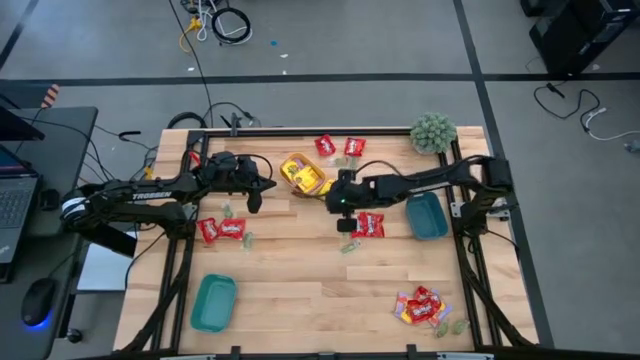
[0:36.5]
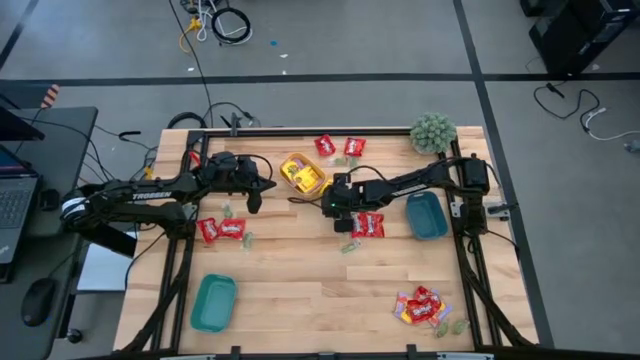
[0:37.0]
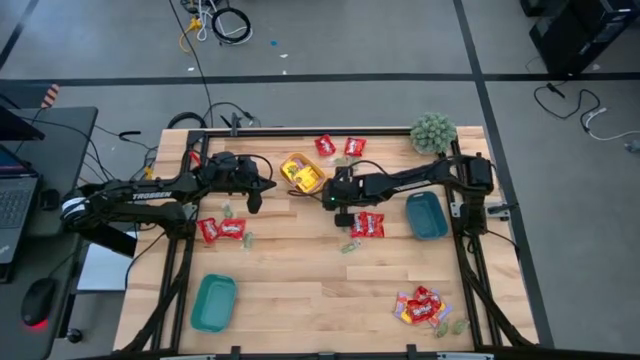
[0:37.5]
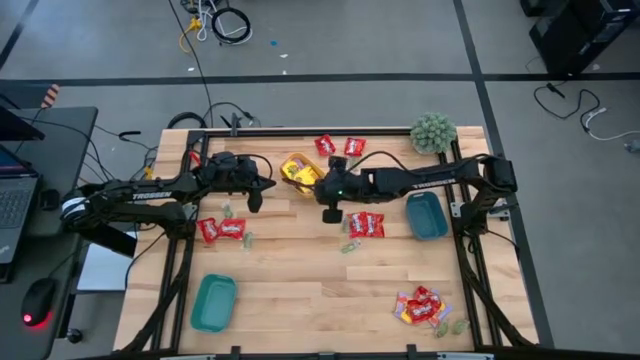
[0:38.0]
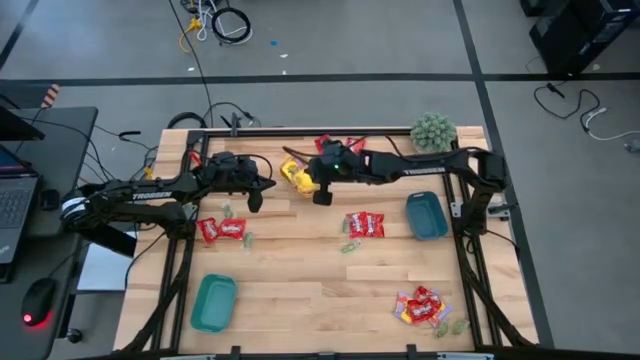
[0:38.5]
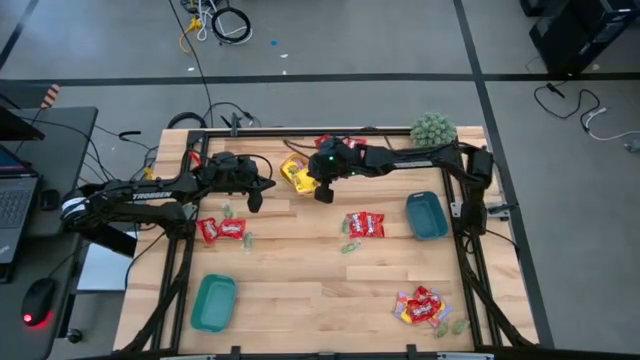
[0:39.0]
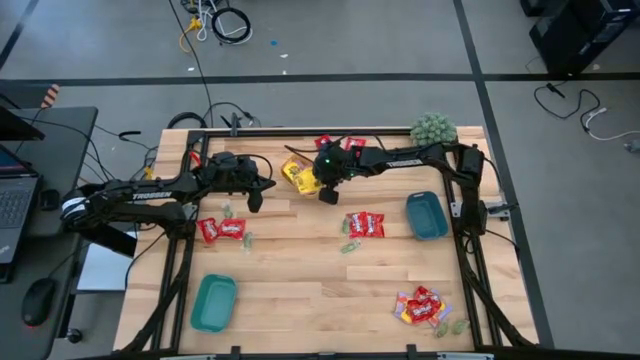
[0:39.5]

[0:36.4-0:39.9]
Task: Sort candy
Put the yellow packet of candy into the yellow bin

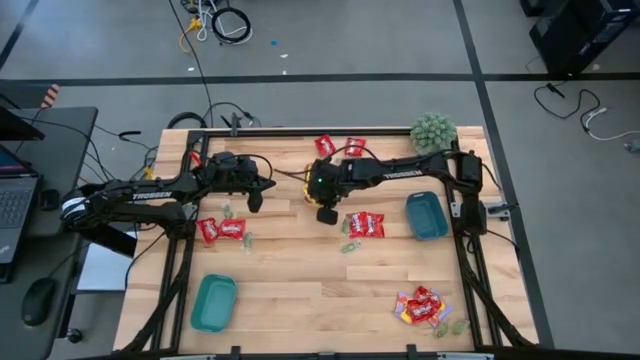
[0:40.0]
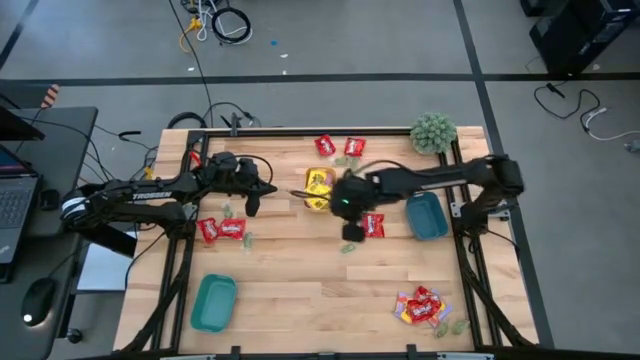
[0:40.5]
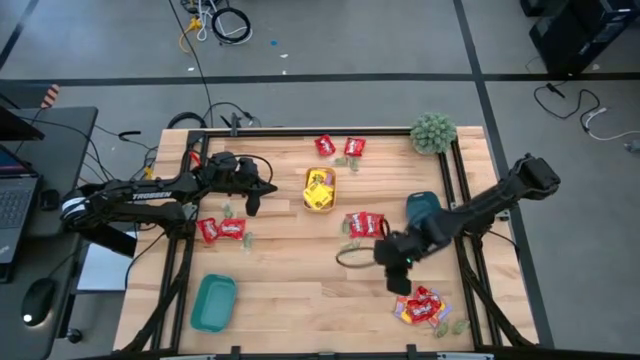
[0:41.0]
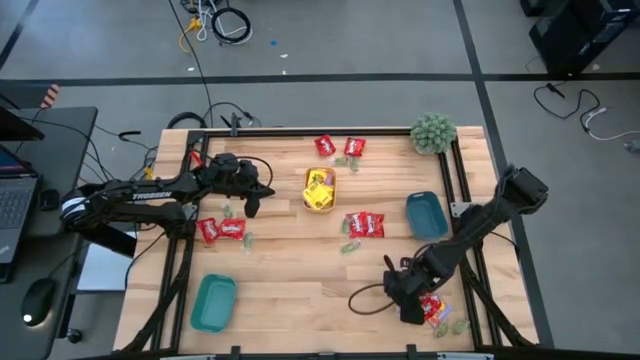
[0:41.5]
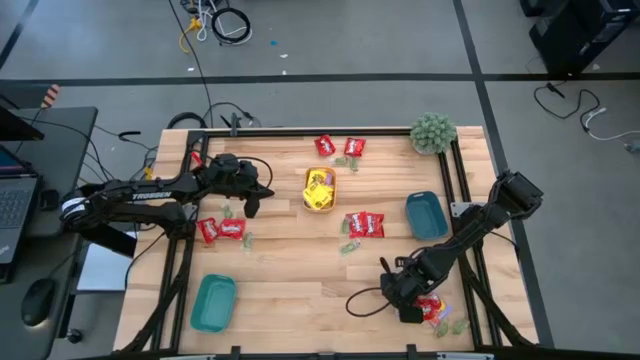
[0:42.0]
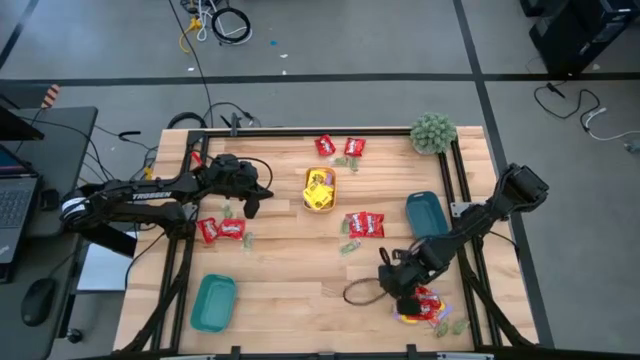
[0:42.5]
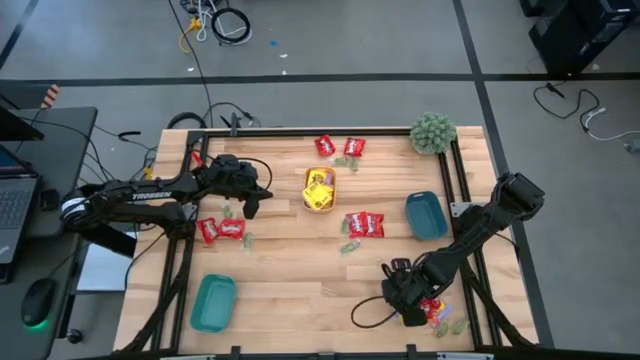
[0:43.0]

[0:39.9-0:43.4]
Put the yellow packet of candy into the yellow bin

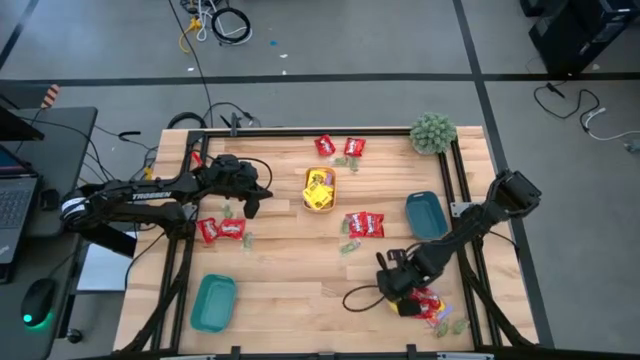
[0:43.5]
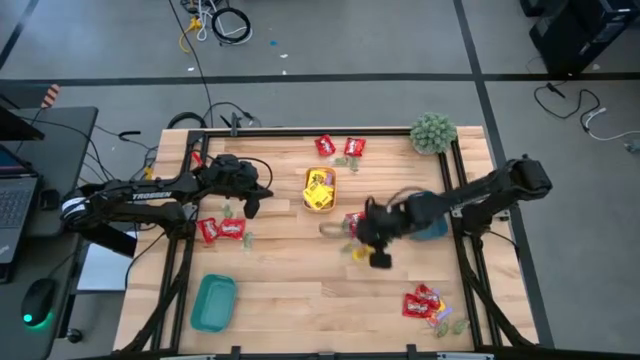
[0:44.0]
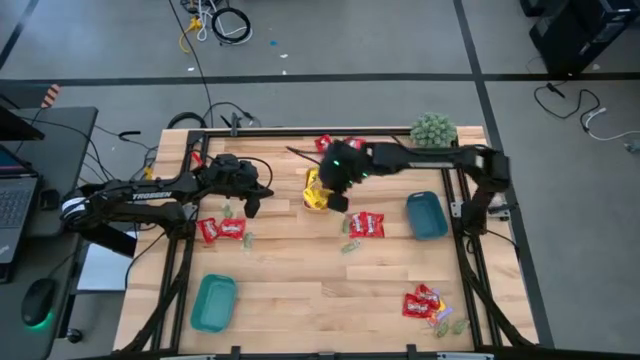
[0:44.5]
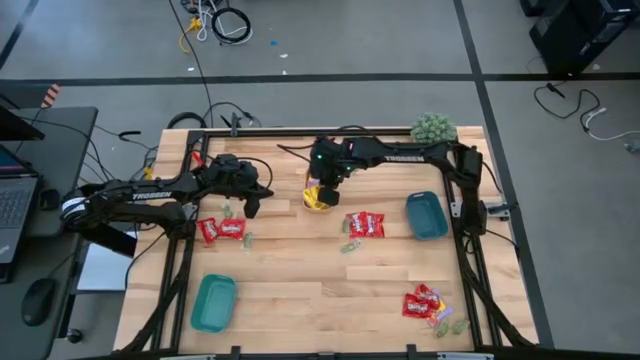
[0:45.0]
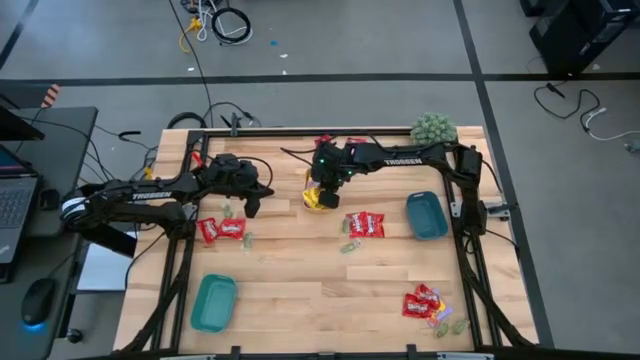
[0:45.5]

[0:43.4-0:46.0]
Put the yellow packet of candy into the yellow bin

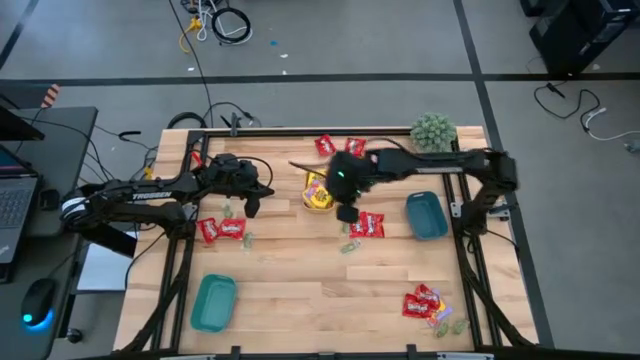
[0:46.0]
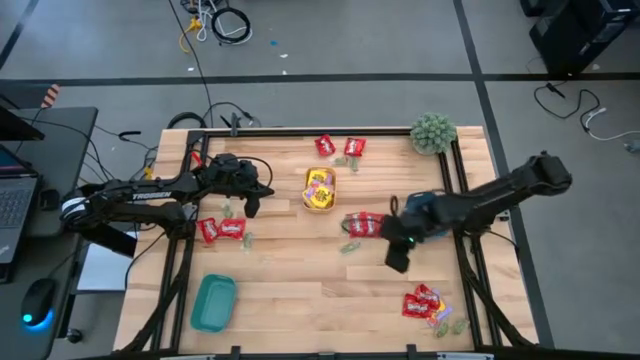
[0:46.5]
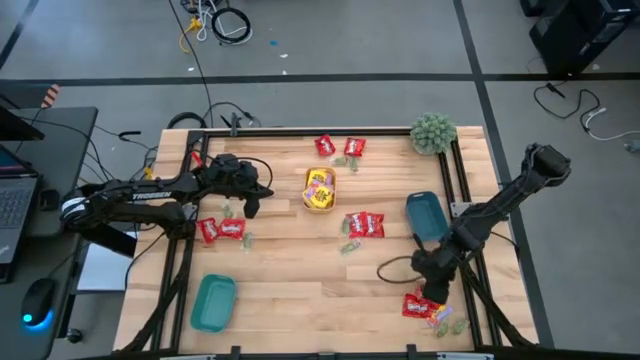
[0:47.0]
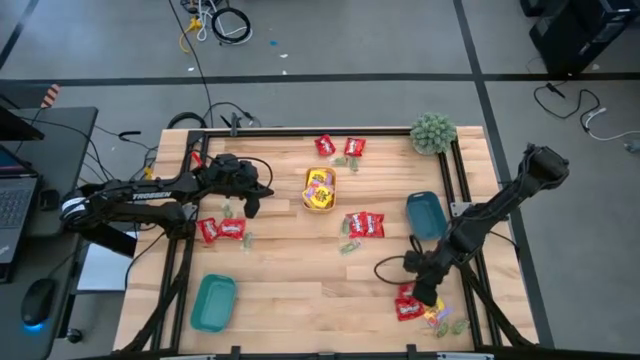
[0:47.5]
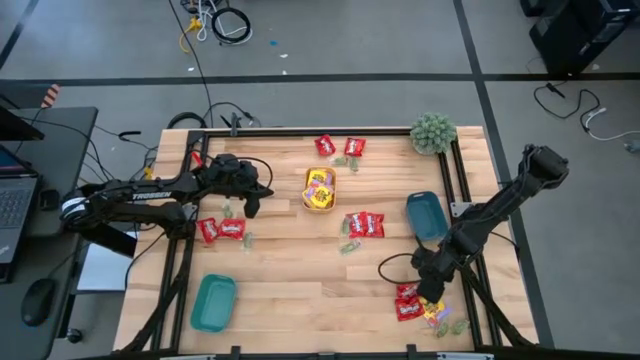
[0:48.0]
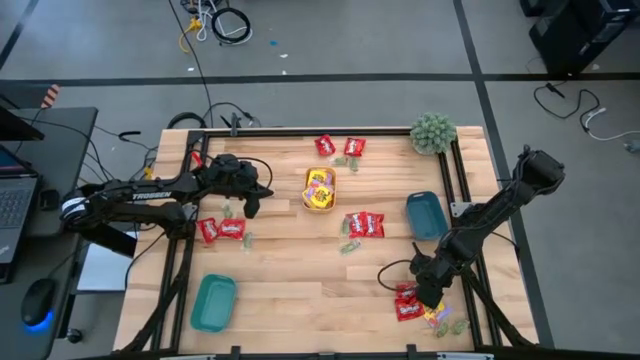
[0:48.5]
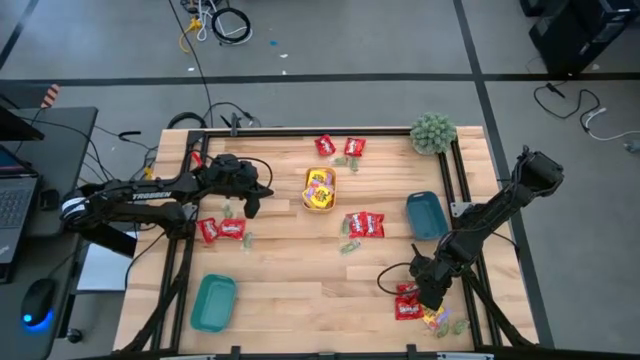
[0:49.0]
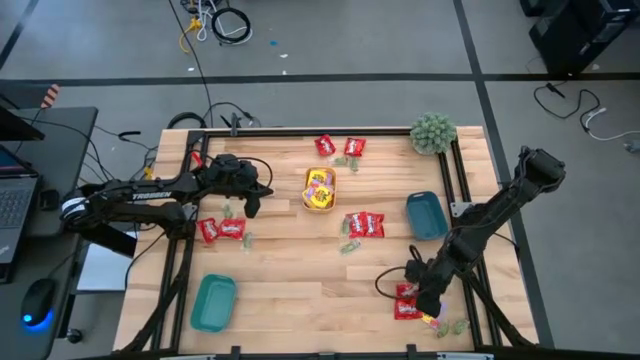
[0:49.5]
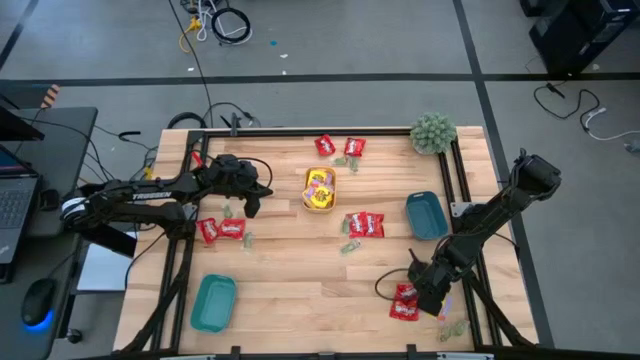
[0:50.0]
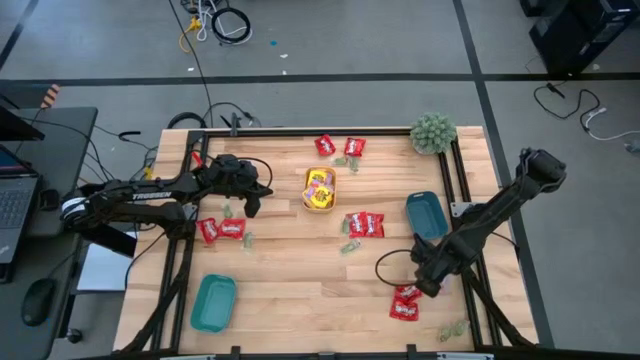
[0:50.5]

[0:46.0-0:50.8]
Put the yellow packet of candy into the yellow bin

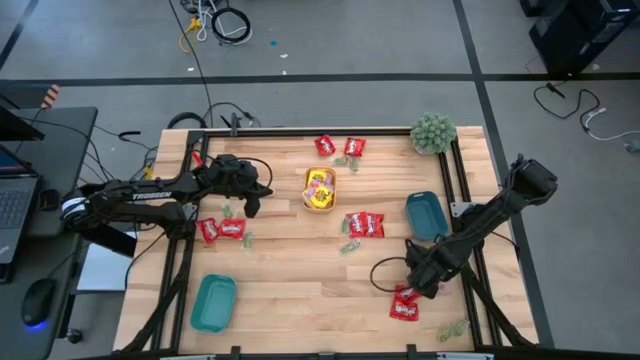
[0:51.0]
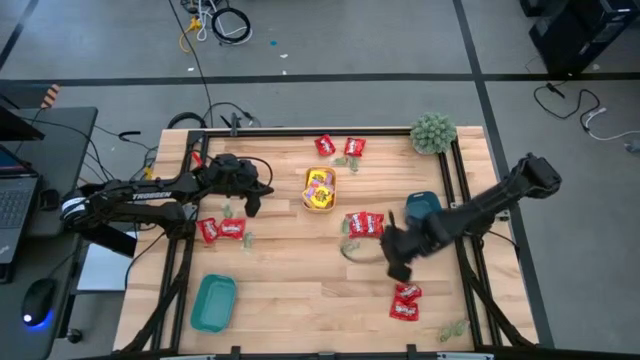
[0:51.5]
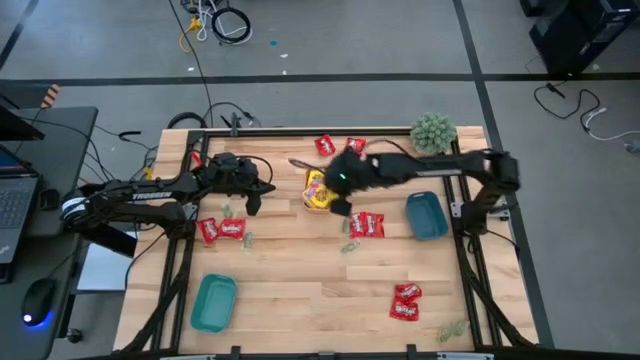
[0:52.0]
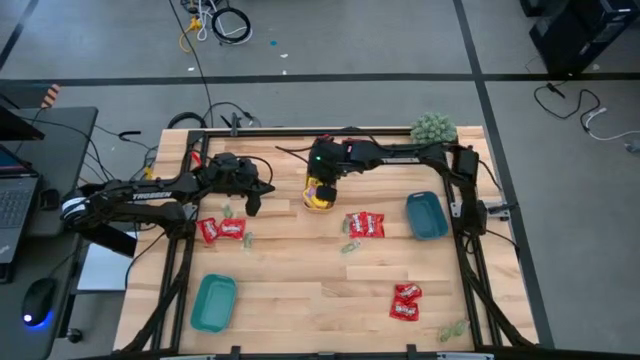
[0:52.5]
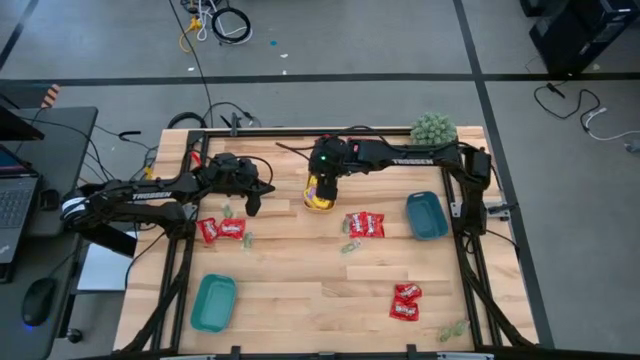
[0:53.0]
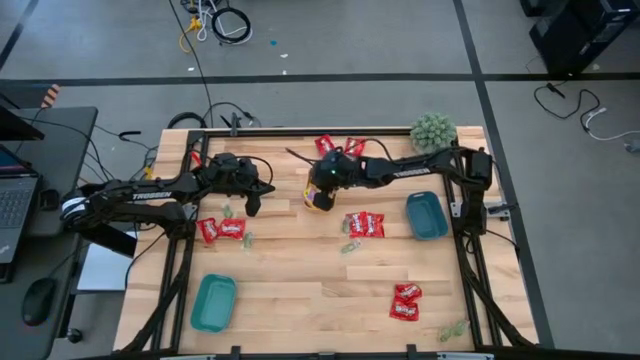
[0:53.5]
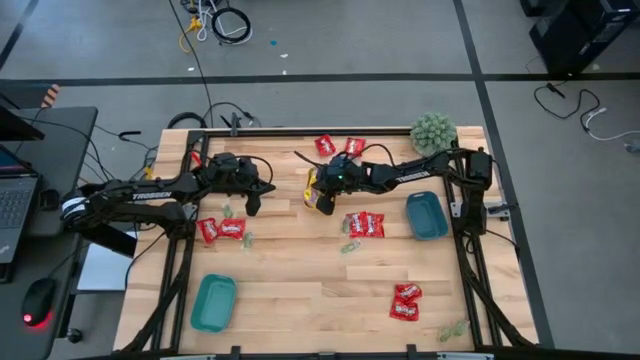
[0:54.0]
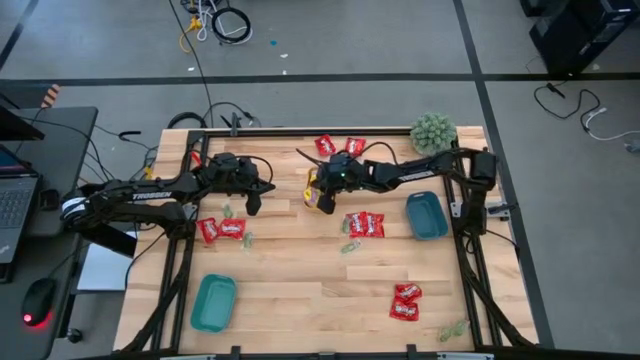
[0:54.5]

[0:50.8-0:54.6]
Put the yellow packet of candy into the yellow bin

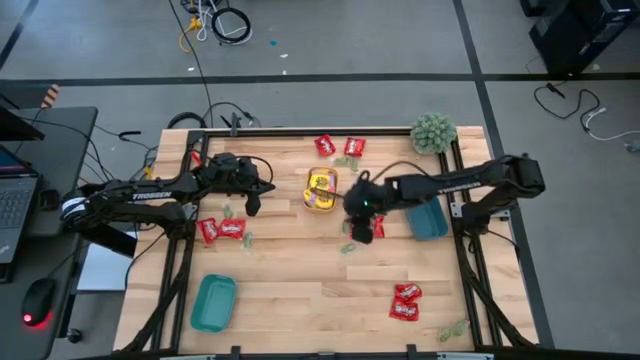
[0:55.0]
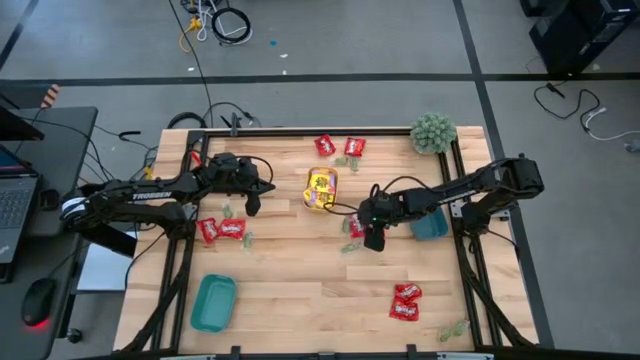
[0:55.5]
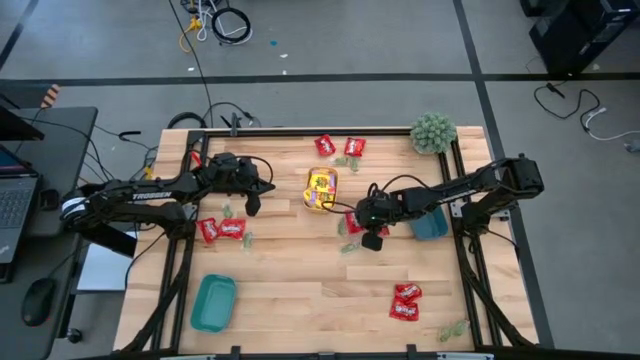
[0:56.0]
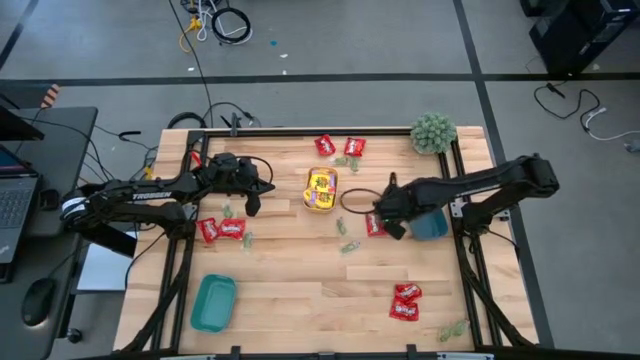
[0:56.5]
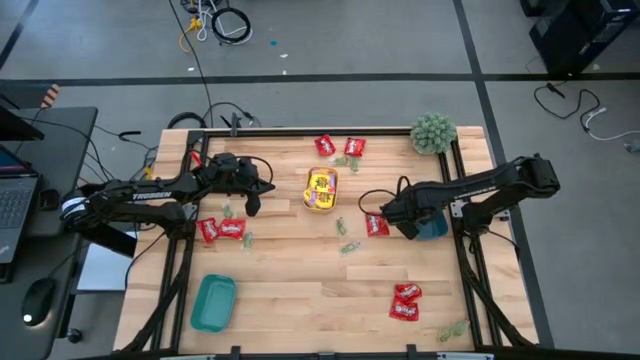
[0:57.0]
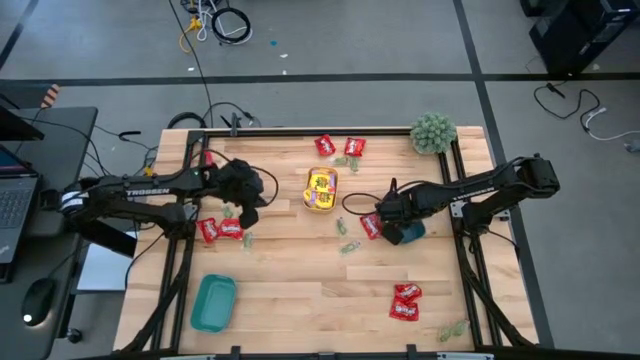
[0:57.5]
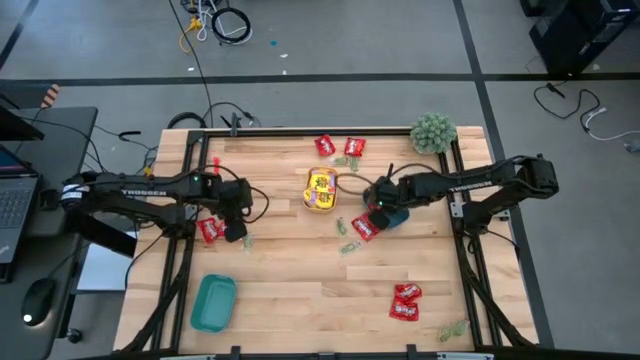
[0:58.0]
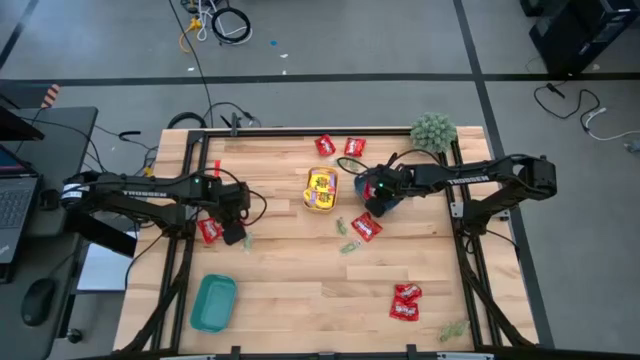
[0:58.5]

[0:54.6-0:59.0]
Put the red packet of candy into the blue bin
